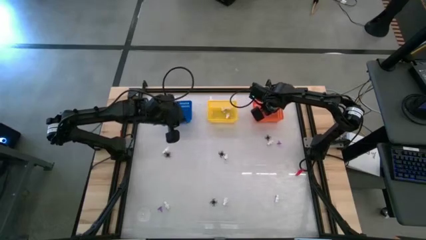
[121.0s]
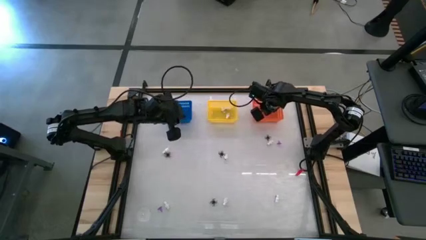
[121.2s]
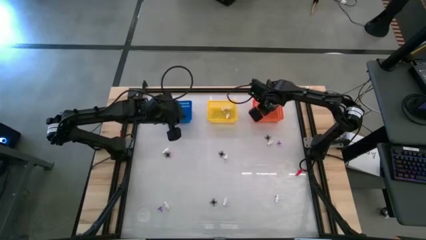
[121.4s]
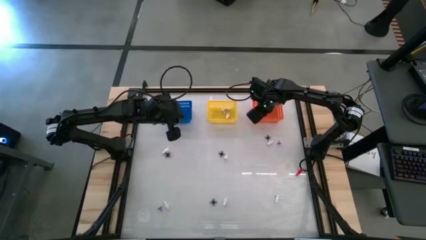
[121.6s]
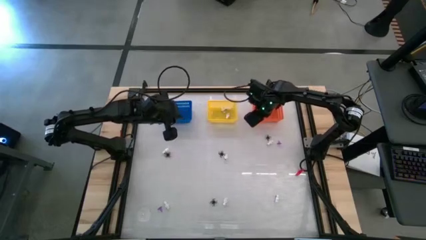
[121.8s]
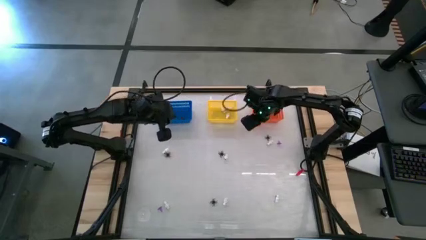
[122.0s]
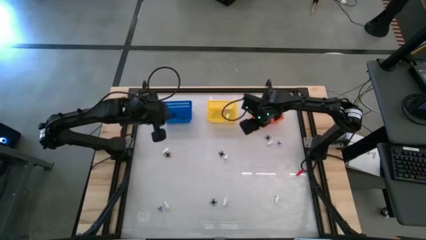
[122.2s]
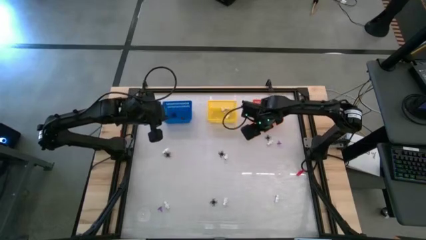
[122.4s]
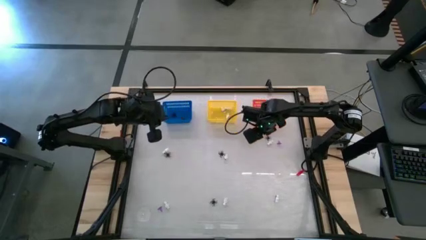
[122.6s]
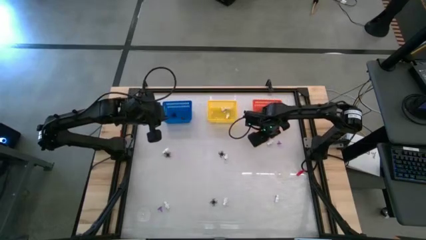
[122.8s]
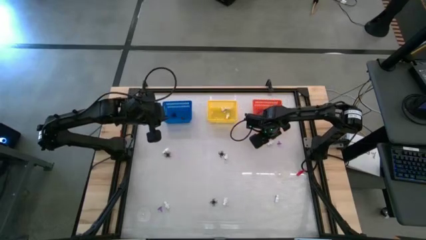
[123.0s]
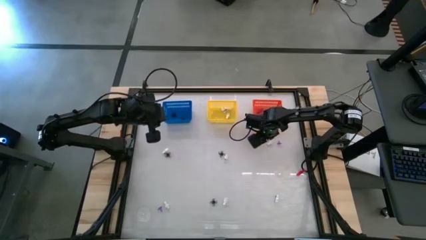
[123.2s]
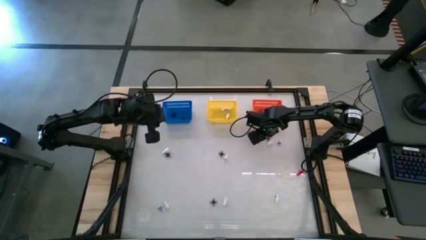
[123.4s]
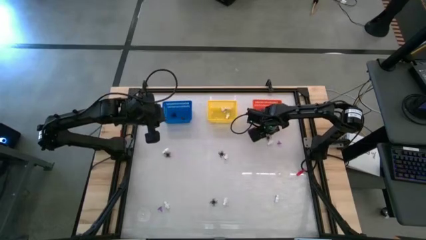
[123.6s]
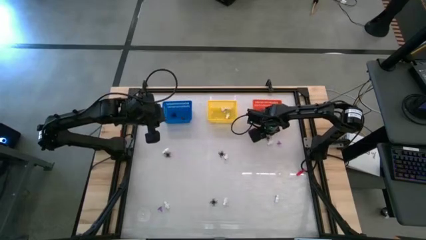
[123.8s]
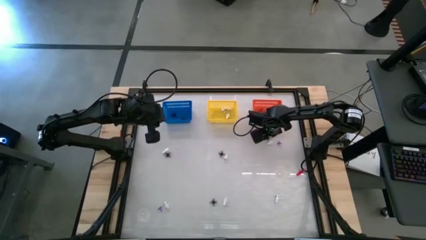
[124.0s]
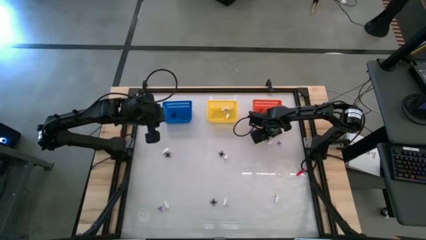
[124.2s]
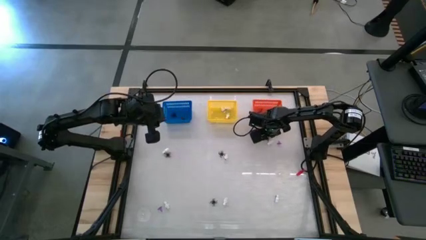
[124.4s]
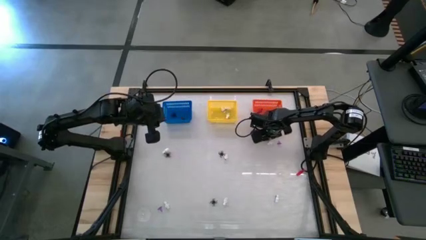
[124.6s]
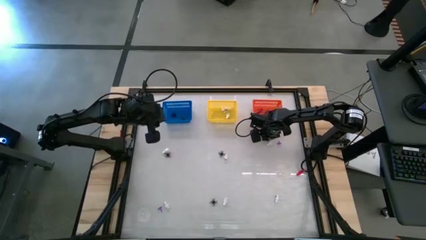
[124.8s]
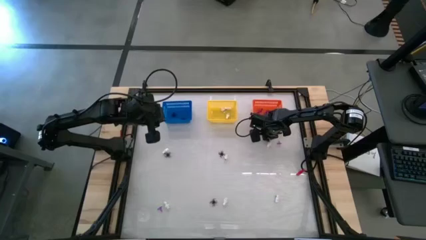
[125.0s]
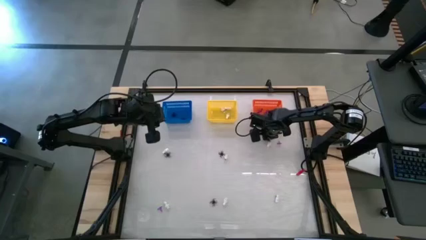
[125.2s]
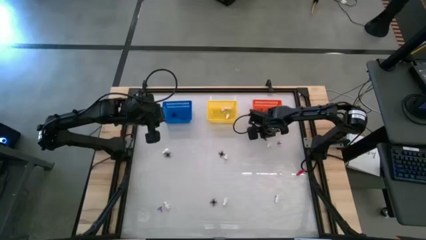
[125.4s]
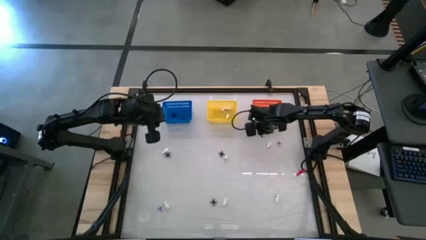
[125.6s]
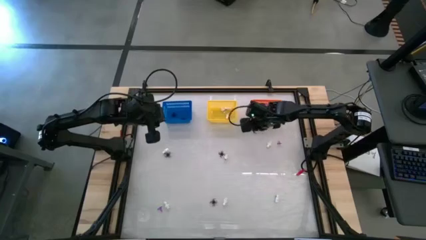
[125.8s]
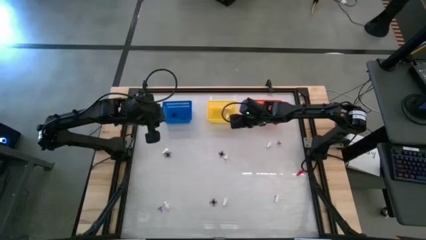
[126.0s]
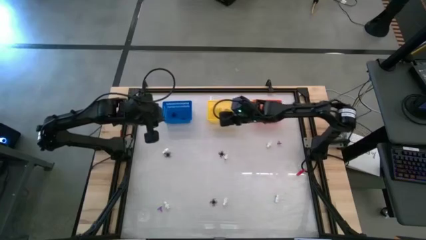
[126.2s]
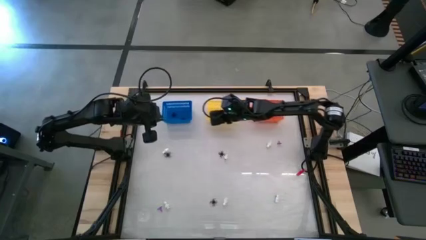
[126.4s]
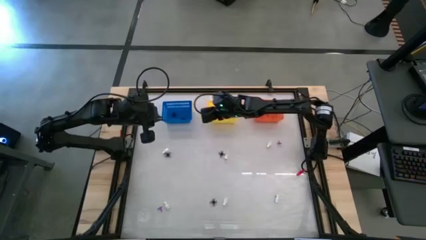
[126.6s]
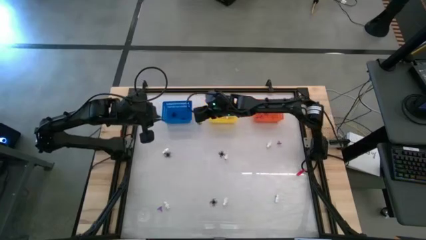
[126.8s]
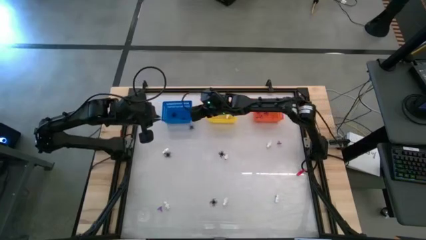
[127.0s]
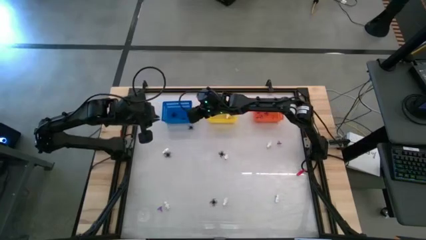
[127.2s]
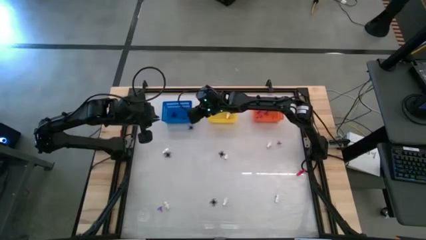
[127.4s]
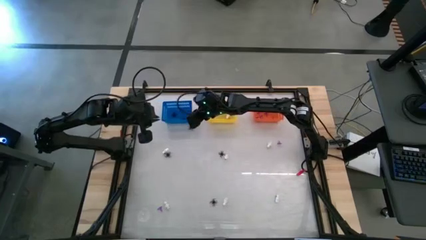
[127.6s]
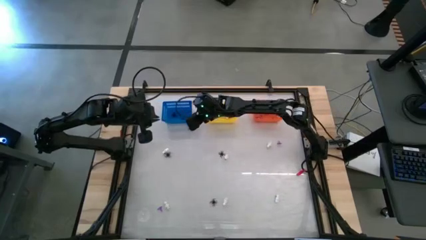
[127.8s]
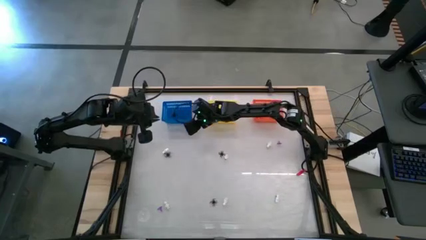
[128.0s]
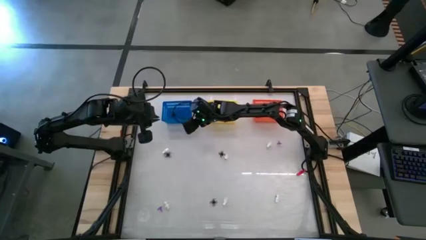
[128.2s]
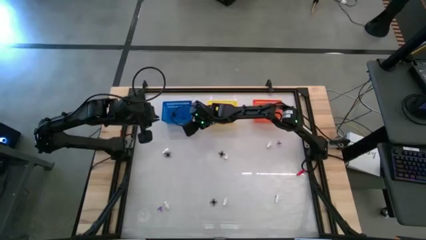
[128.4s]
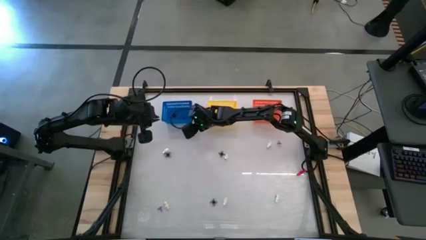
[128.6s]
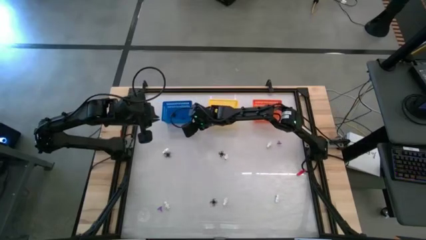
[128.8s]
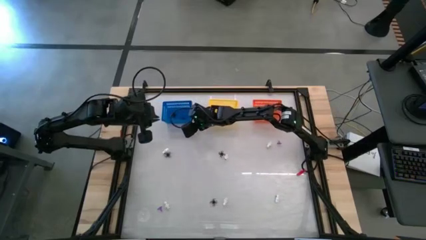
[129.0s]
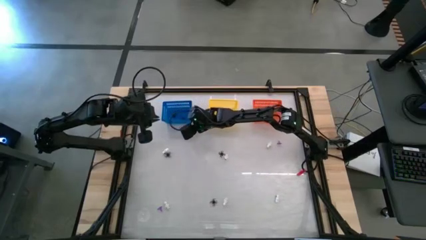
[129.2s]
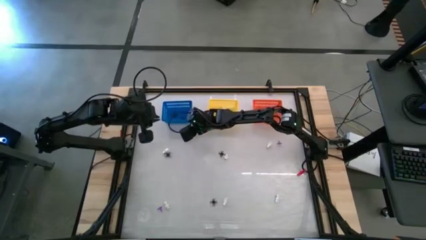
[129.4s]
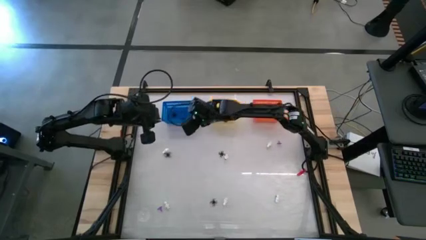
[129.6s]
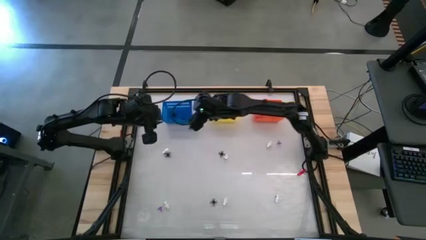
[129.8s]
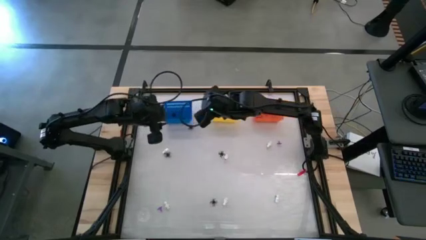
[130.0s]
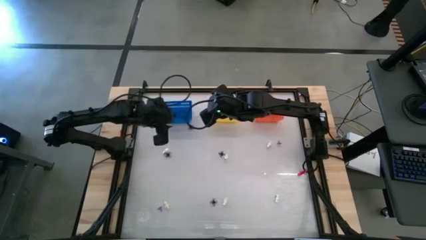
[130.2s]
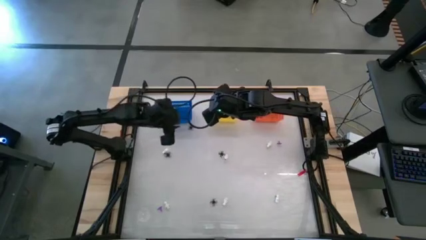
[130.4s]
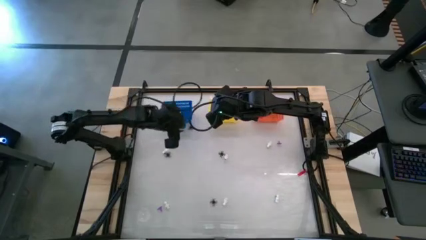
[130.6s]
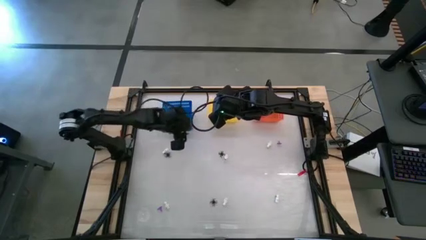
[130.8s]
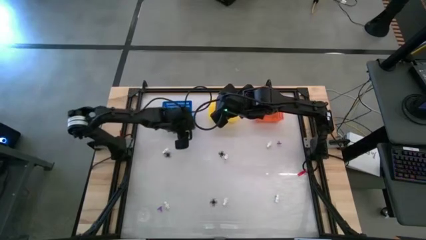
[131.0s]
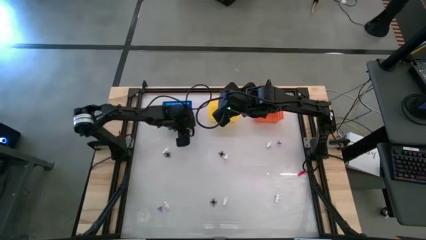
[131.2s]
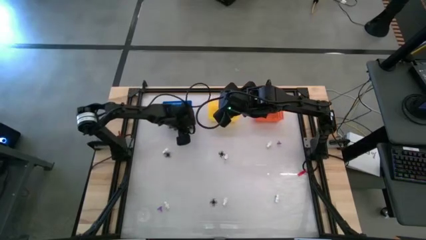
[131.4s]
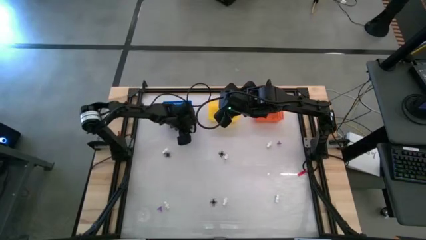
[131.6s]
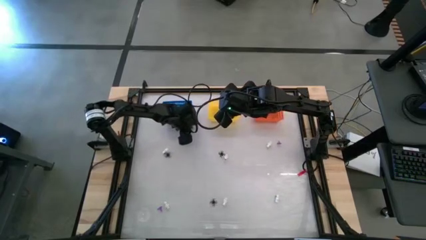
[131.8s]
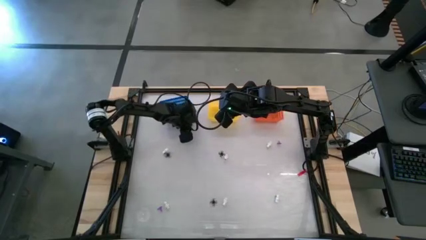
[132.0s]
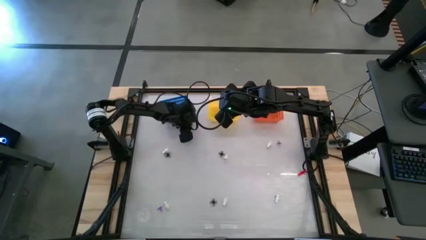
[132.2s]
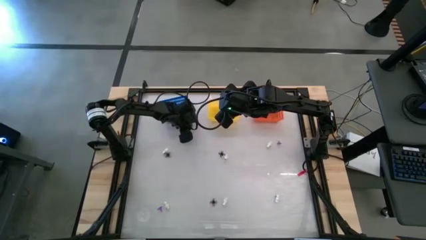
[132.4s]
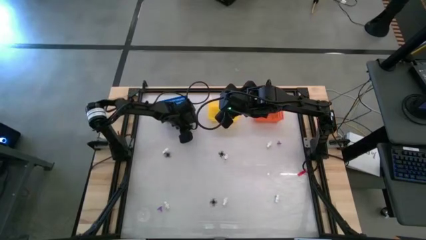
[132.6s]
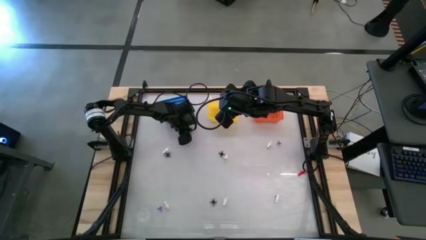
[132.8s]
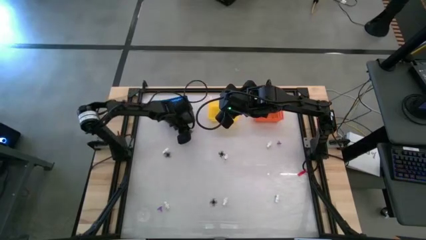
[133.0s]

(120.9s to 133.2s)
Task: Sort Halloween decoration
Put the black spider toy into the blue basket

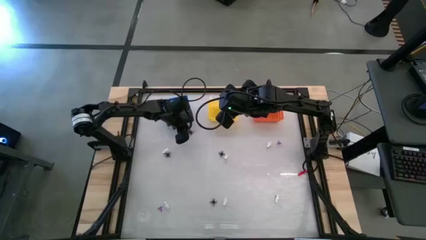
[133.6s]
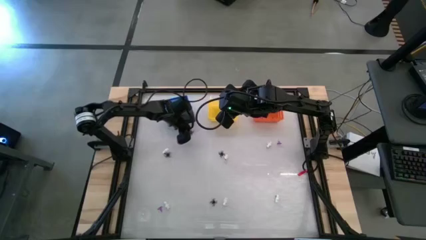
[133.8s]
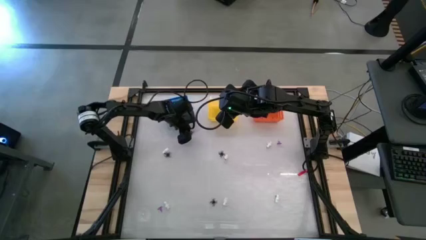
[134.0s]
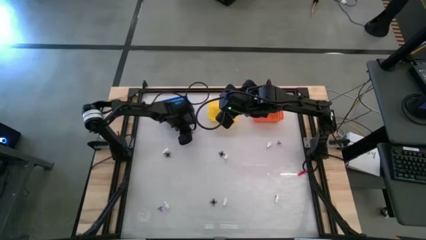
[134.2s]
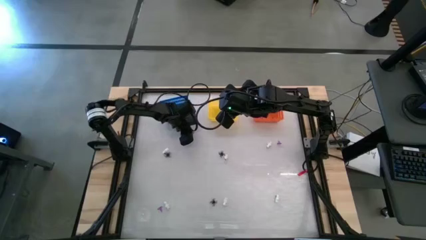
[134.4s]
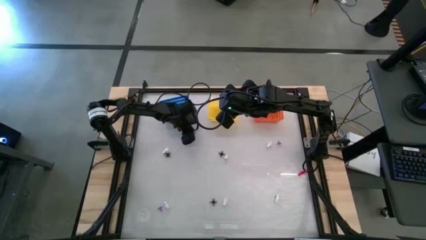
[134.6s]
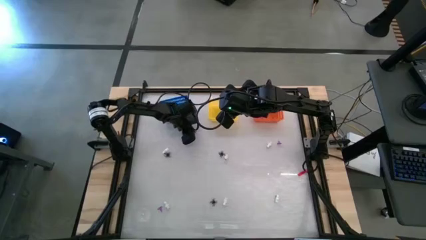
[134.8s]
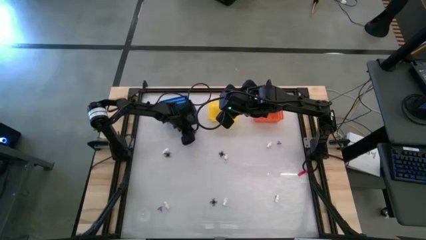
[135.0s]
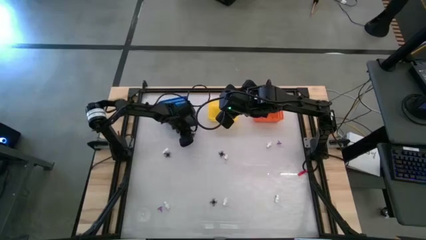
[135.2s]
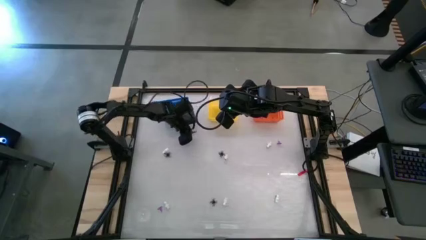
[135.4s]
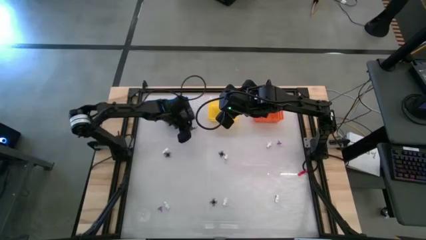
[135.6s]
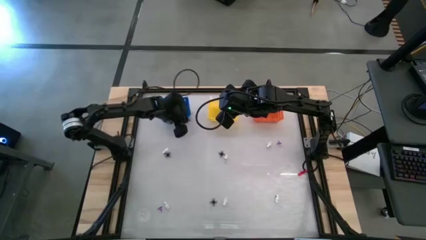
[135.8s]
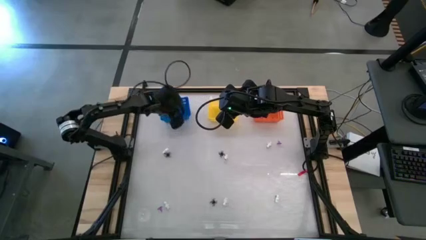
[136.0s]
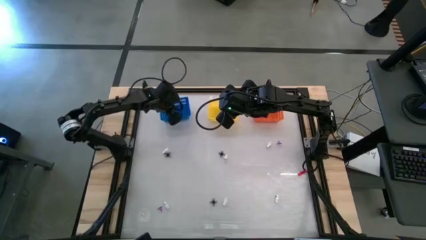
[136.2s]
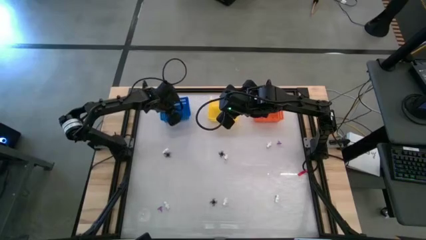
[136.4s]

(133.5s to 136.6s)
Put the black spider toy into the blue basket

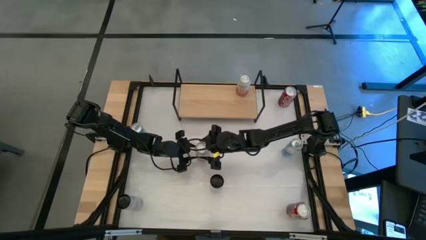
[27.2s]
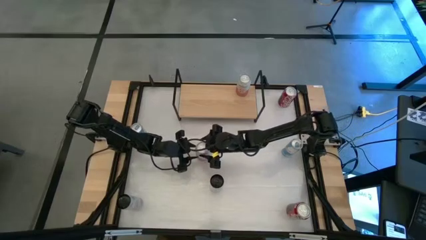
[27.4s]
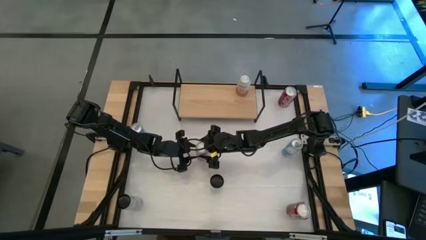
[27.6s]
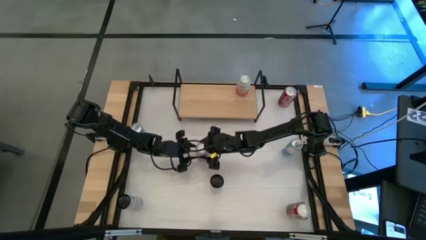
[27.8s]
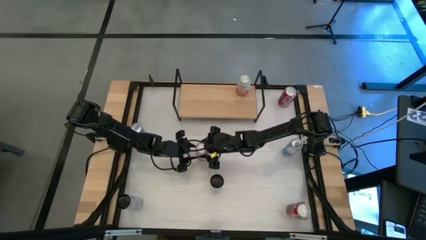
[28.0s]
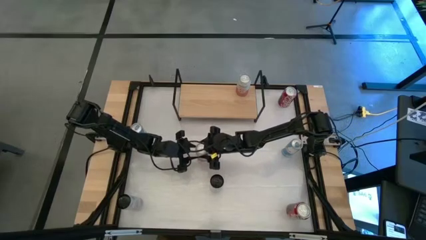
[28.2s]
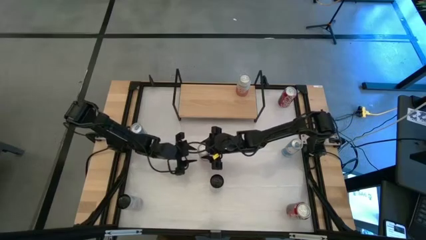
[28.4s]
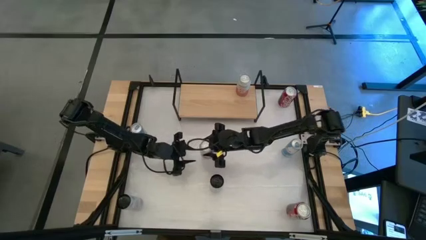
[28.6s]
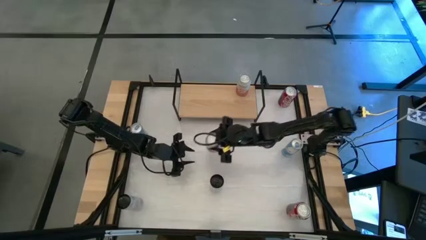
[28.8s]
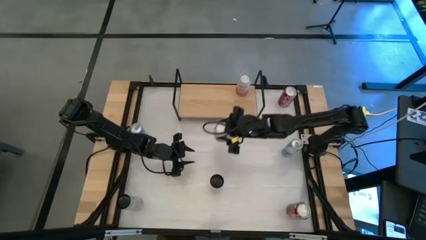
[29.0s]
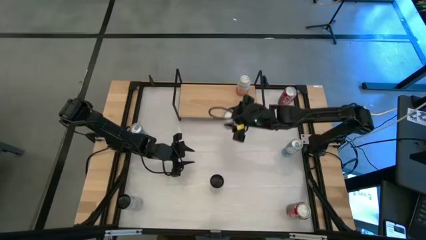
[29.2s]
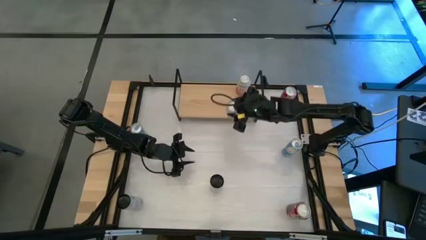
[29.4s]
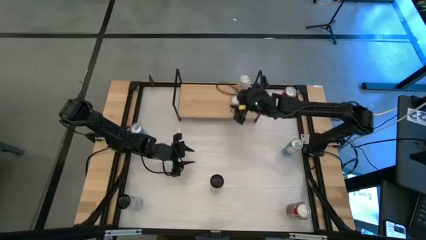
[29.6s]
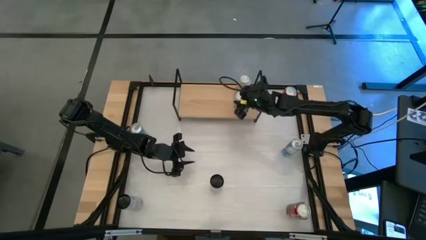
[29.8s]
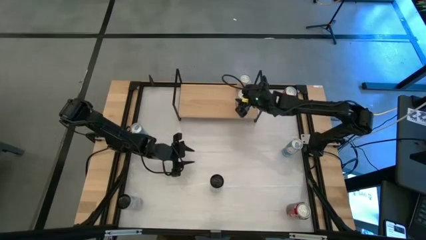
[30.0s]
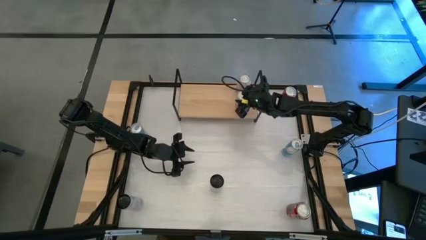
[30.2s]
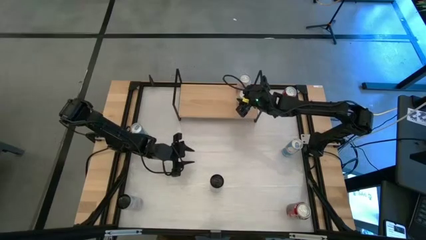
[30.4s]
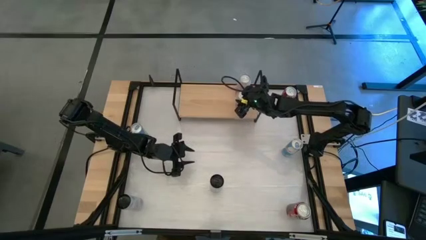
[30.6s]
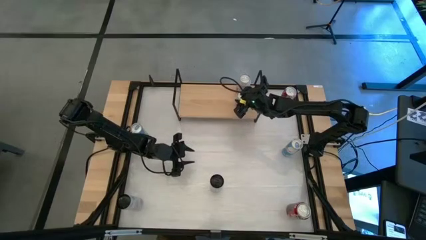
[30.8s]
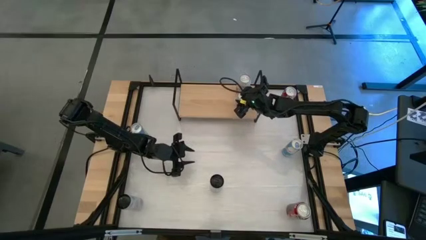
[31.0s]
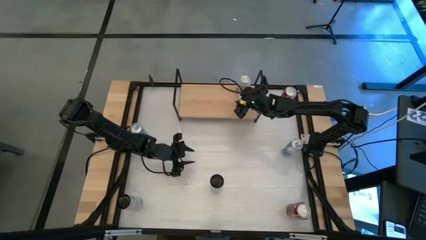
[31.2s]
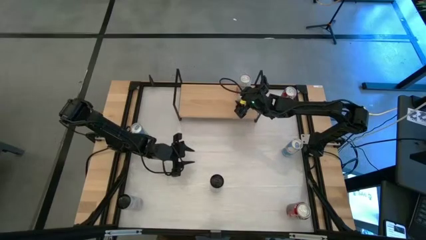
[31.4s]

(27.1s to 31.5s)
Task: Place canned beverage on shelf
Put the orange soda can on the shelf
